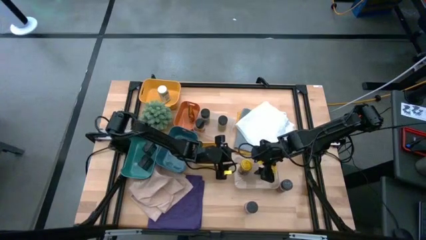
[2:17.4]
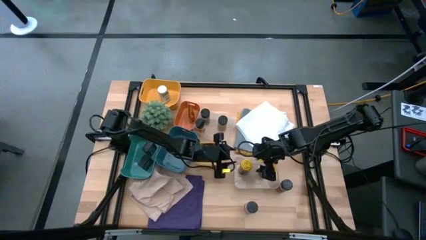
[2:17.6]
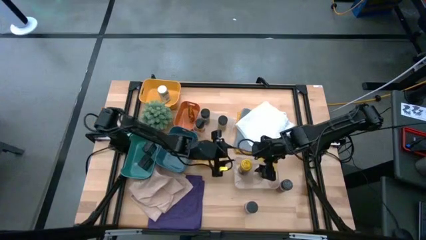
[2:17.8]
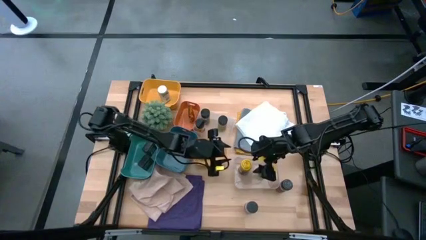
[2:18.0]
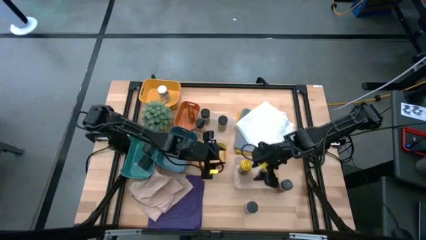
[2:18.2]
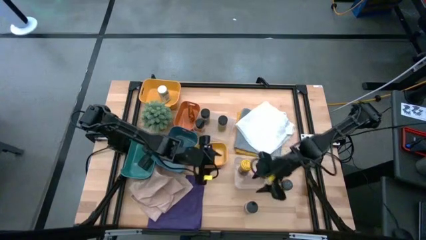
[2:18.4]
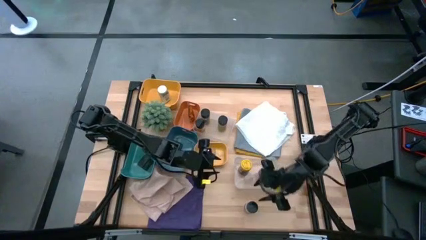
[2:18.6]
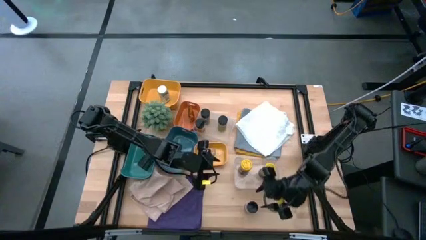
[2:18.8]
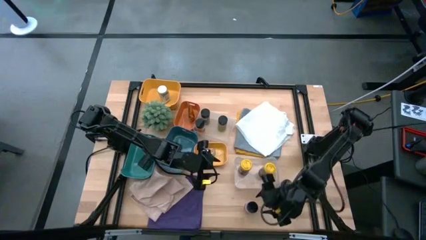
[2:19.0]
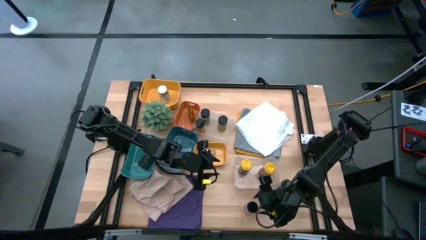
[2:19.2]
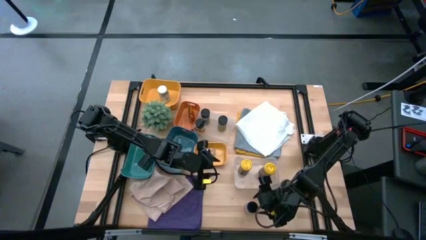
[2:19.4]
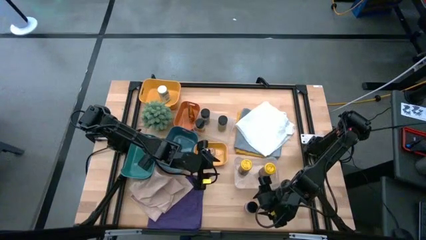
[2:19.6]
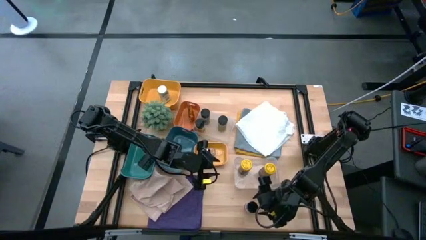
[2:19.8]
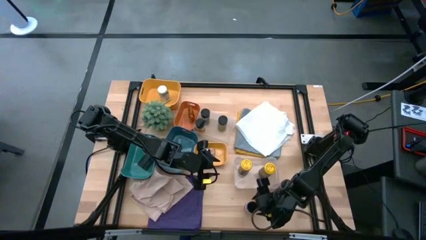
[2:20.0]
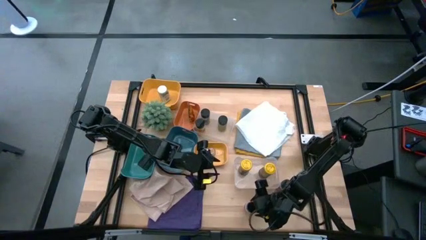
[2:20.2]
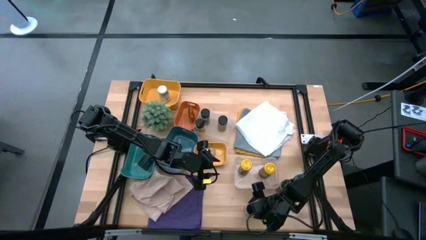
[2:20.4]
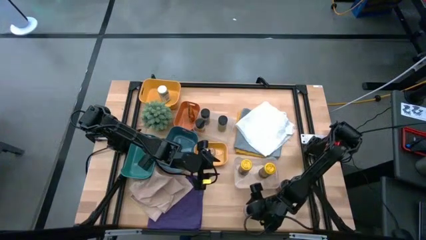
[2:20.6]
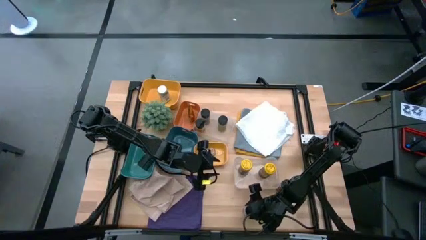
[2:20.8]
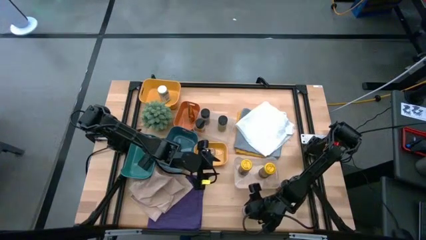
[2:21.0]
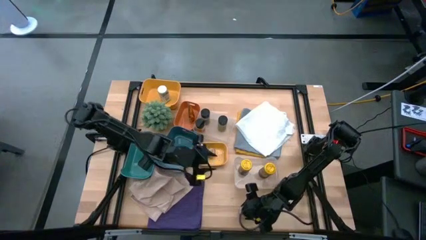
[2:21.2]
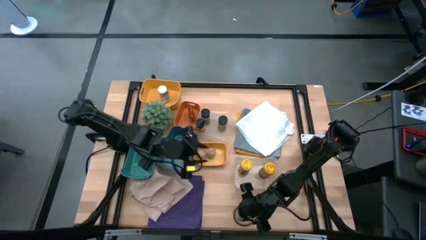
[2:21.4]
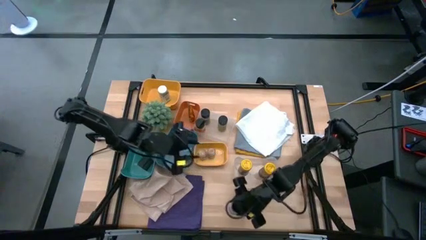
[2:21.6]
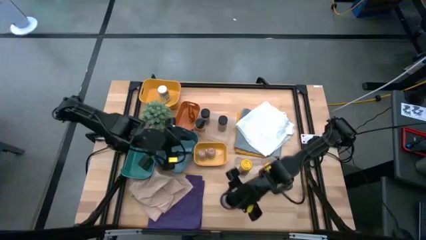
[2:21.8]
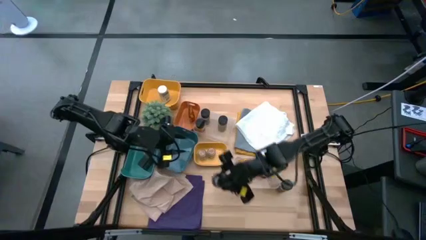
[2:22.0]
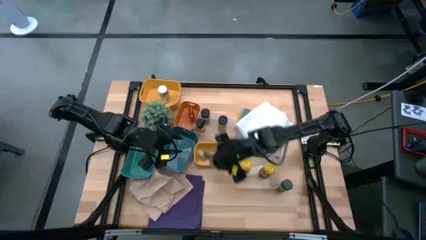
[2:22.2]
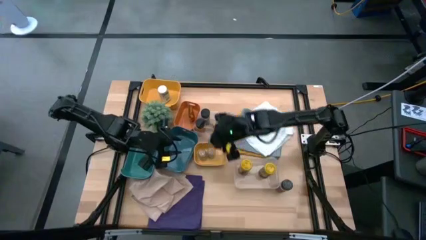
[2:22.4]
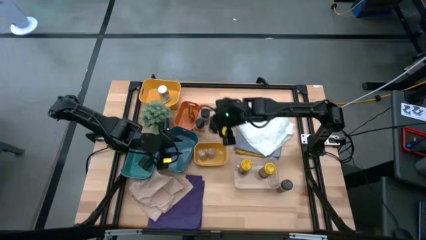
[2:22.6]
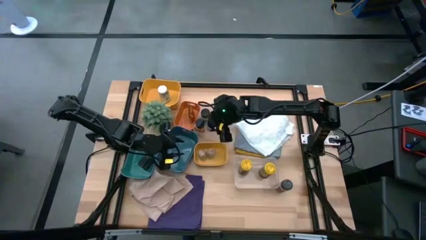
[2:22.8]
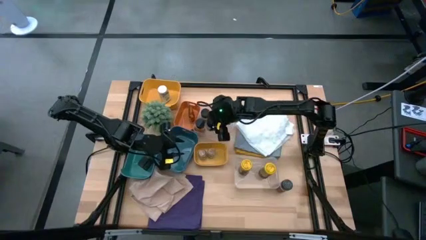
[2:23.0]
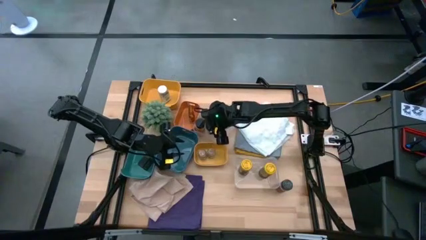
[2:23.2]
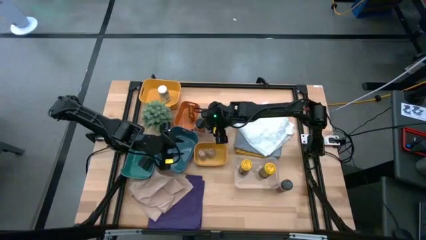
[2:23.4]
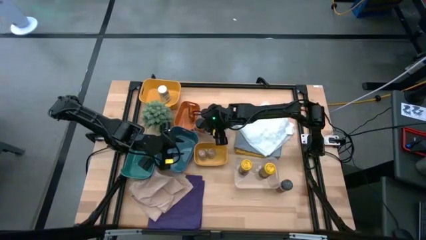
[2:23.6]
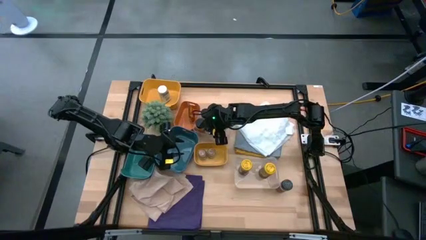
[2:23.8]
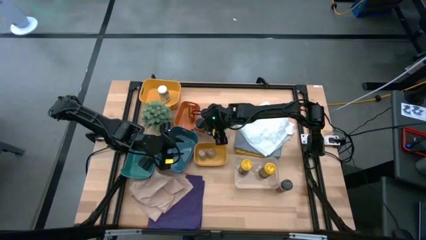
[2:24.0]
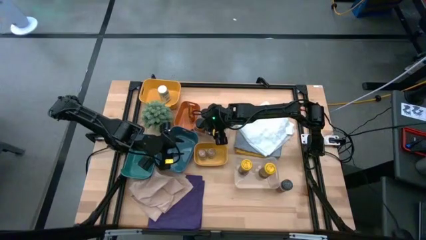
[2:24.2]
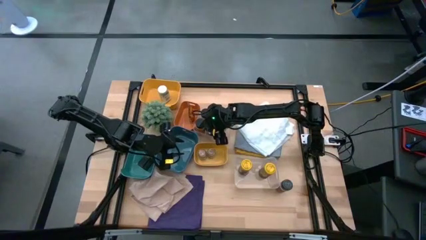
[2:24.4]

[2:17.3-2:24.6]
Task: Sort spices by type
Put the left black seasoning bottle into the top transparent bin

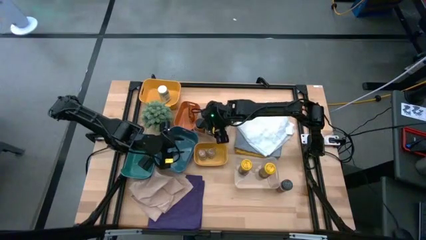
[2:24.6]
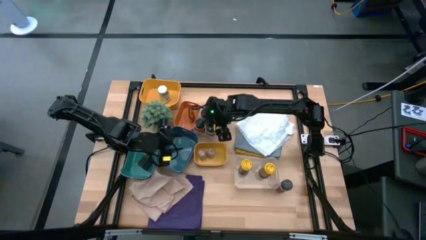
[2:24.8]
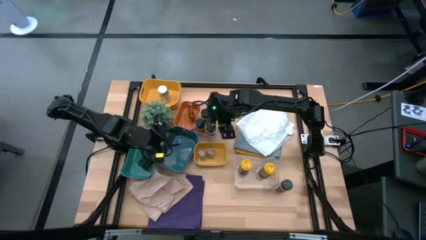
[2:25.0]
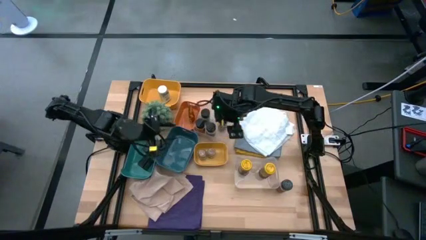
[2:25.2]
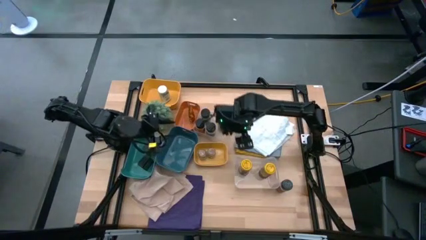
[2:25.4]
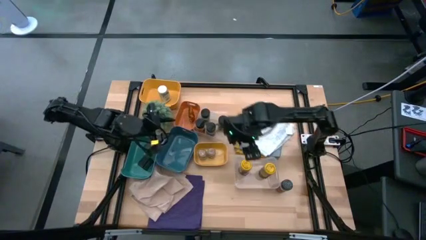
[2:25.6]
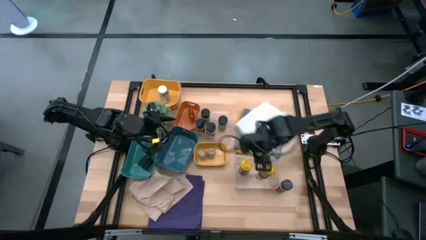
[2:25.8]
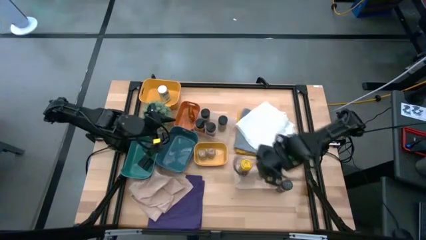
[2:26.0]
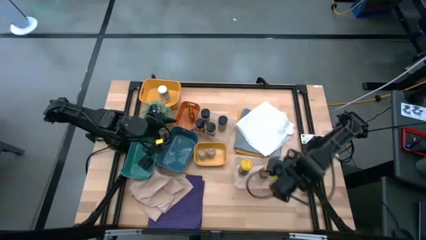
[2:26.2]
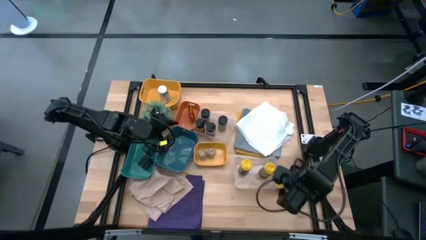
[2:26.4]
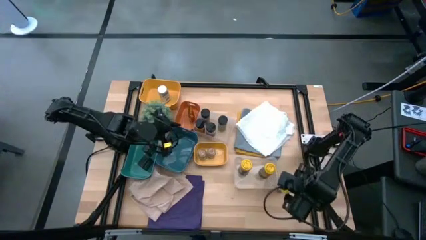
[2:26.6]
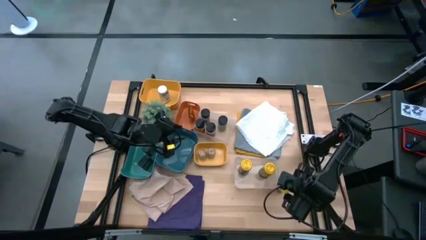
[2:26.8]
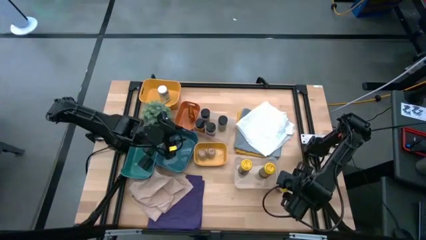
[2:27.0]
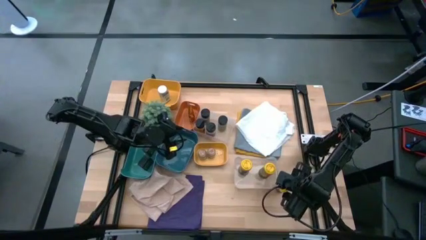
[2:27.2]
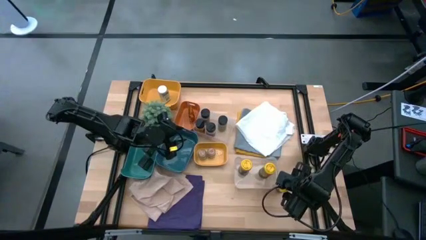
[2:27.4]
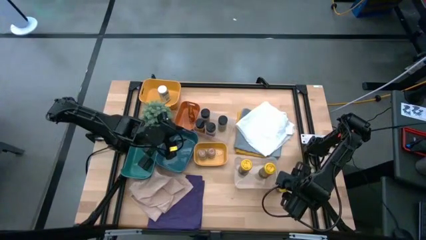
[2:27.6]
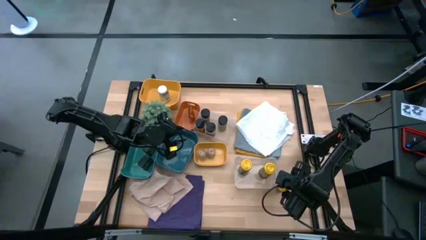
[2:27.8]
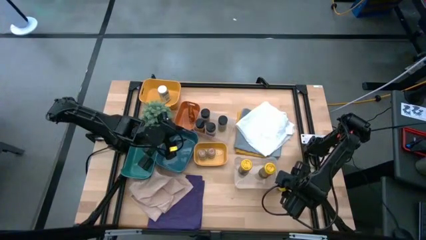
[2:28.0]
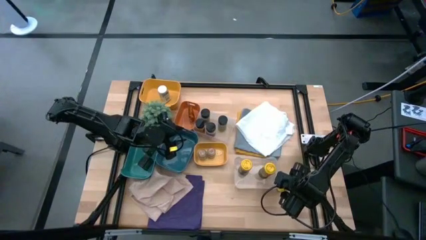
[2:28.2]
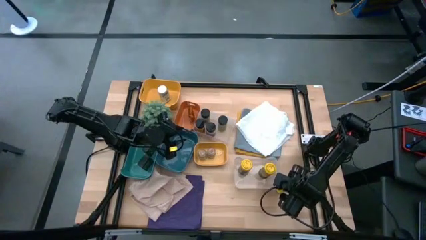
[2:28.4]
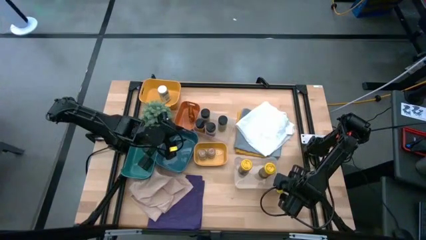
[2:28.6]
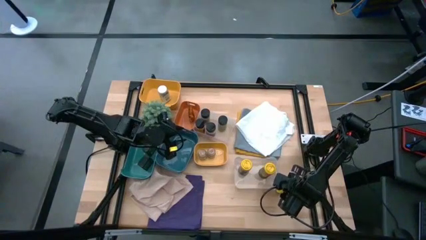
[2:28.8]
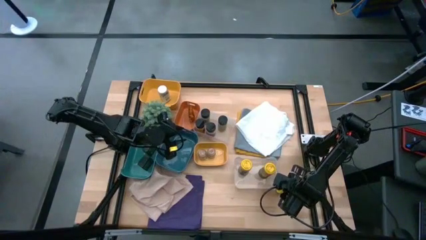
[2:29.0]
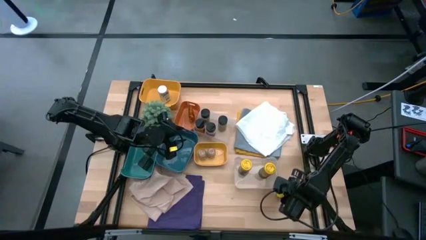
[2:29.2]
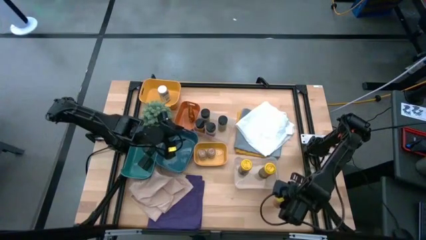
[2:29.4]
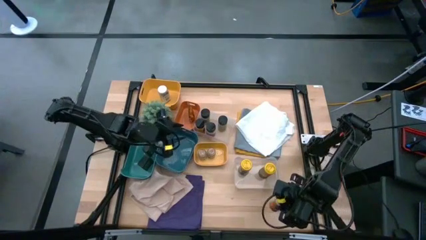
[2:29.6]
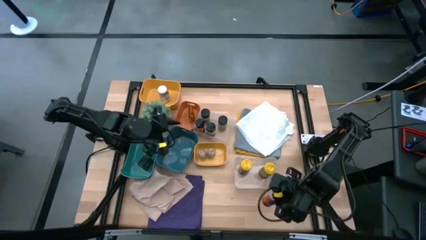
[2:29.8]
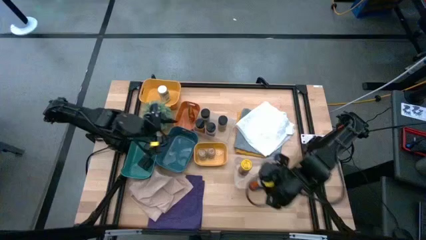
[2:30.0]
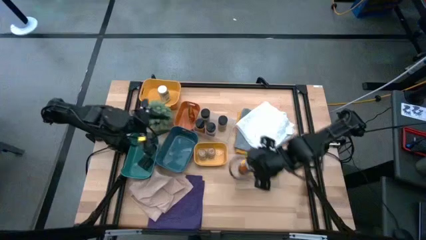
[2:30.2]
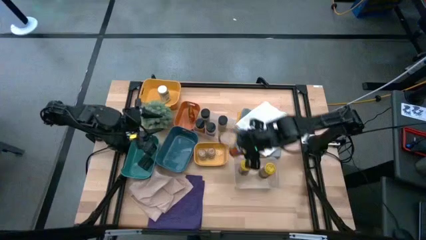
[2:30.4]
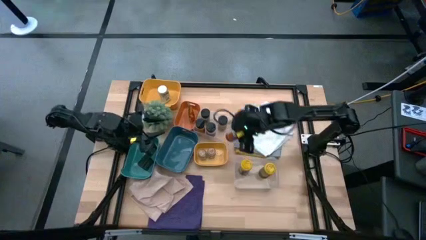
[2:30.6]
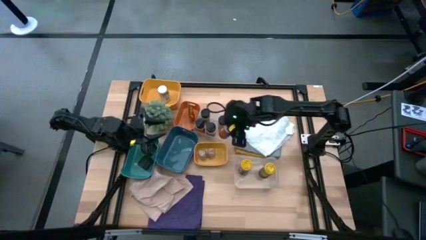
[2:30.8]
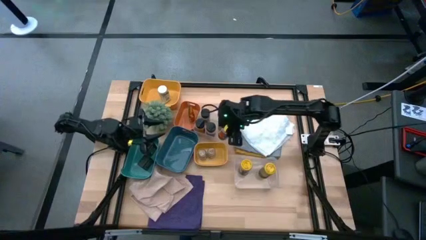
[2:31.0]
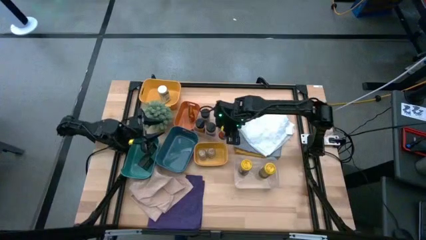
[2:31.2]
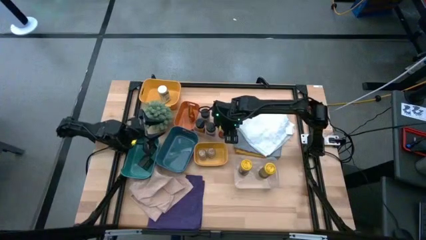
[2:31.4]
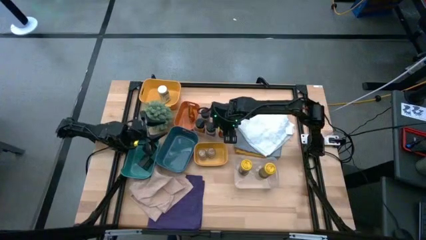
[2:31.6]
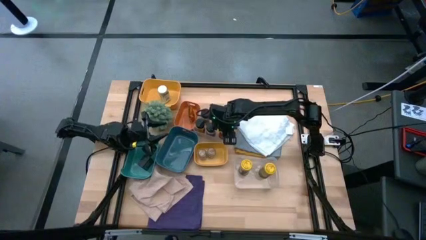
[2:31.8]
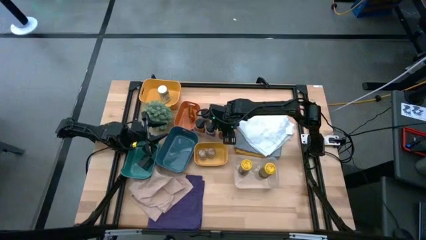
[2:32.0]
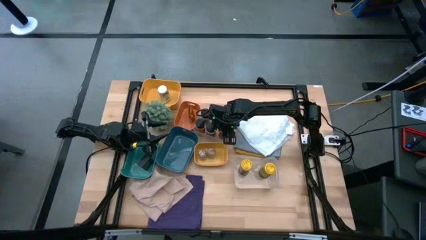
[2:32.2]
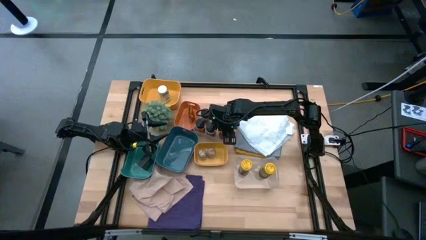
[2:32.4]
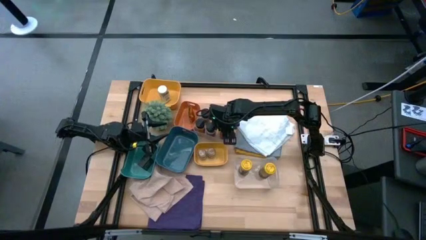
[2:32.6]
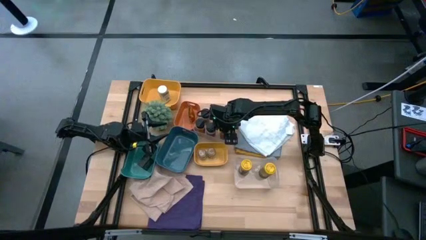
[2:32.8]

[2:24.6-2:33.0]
Put the black seasoning bottle into the top transparent bin

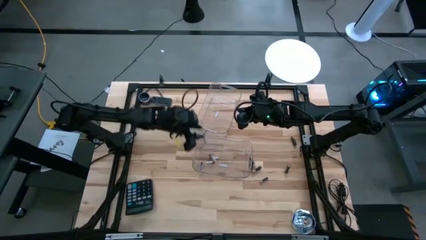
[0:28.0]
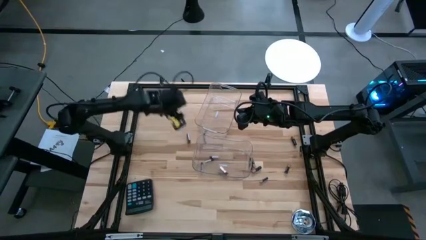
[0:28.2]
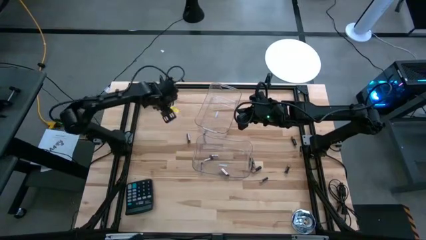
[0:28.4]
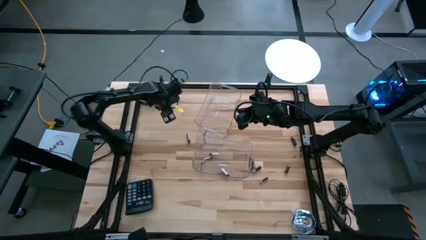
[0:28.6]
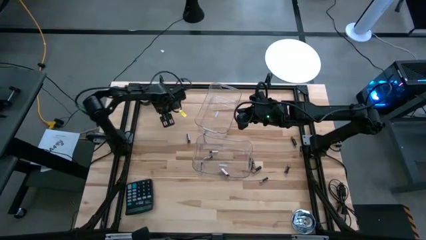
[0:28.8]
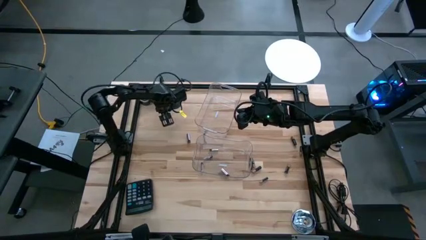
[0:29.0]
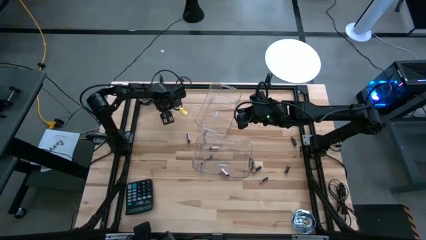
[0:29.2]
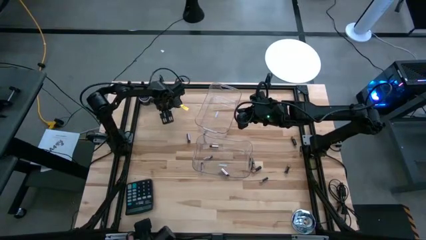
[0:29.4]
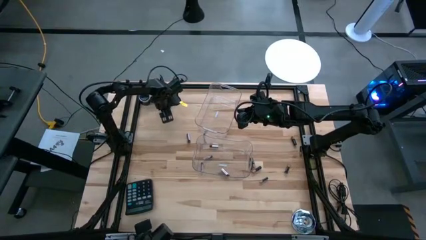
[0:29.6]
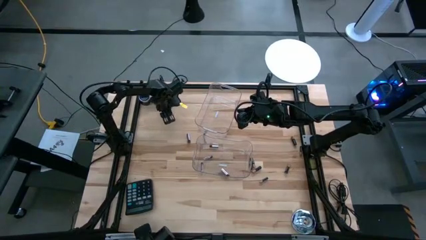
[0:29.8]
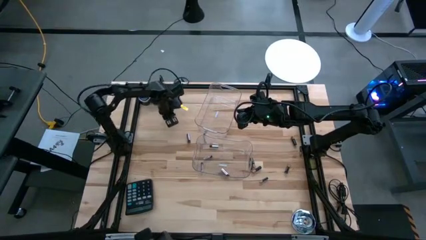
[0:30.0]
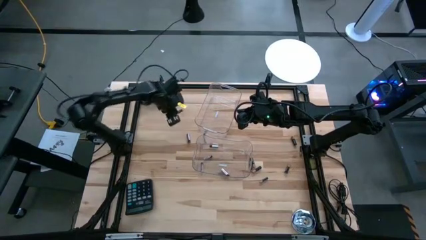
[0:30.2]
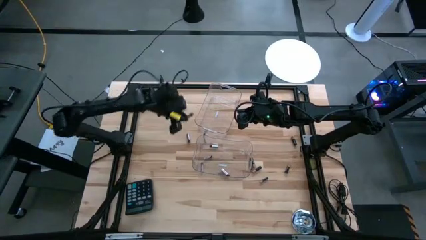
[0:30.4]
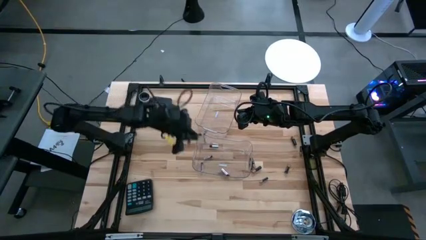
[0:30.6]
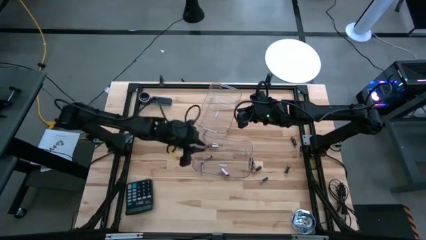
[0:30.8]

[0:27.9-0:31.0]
Task: Sort batteries
Put the silver battery into the bottom transparent bin
